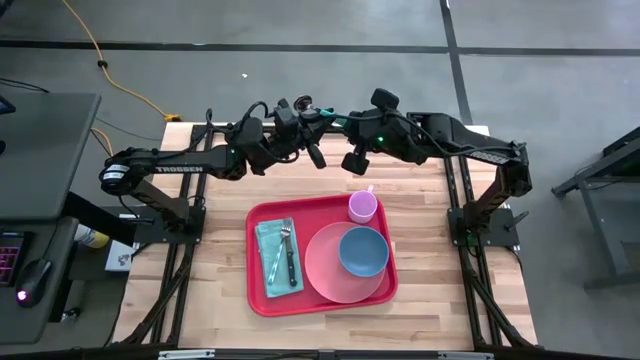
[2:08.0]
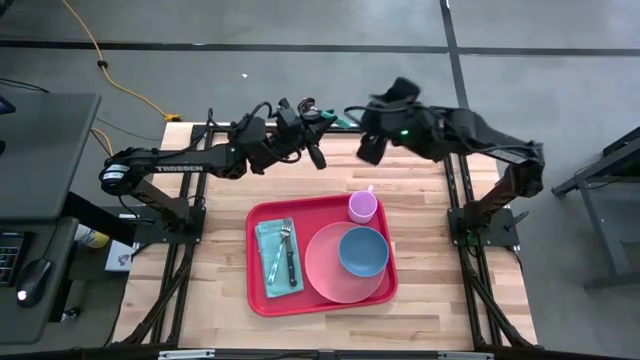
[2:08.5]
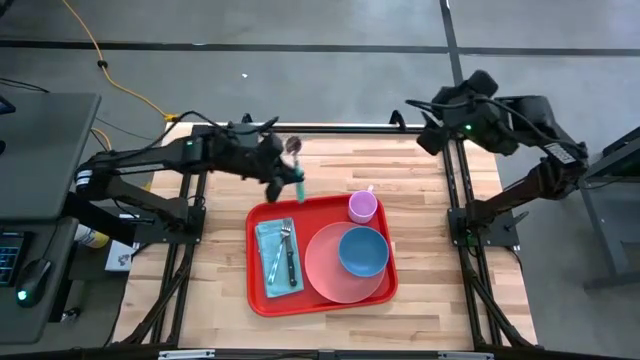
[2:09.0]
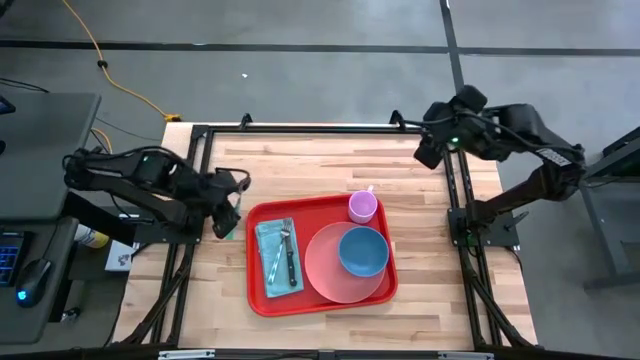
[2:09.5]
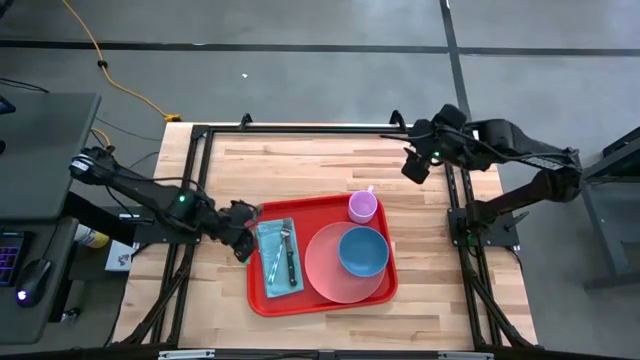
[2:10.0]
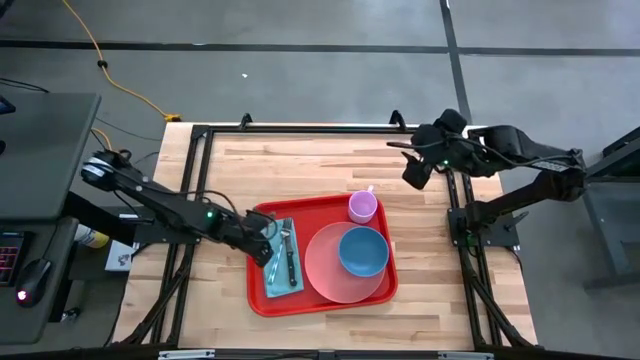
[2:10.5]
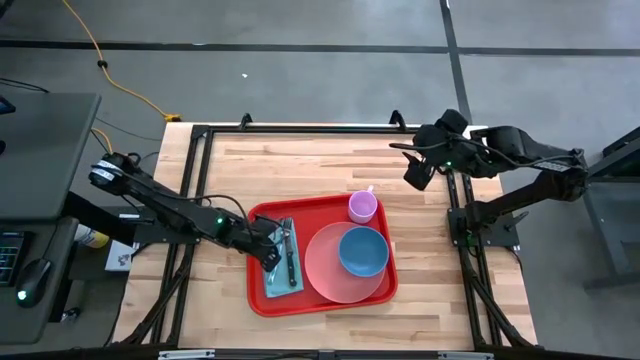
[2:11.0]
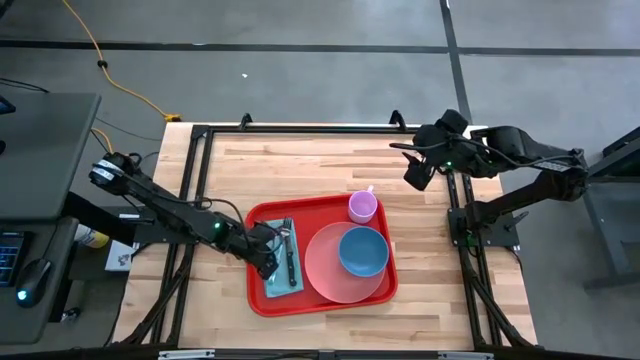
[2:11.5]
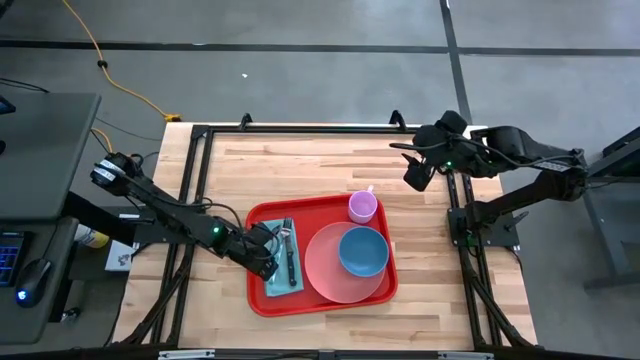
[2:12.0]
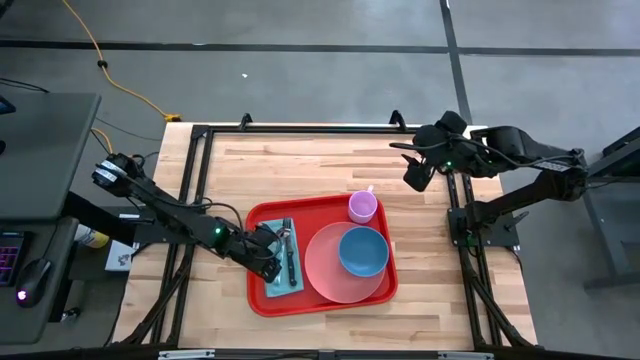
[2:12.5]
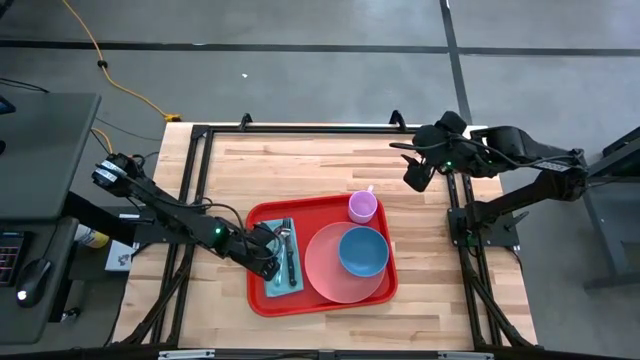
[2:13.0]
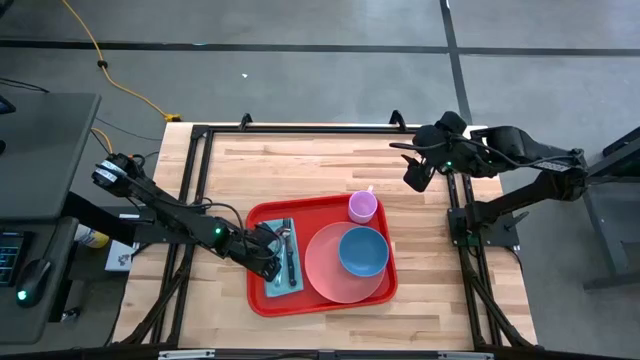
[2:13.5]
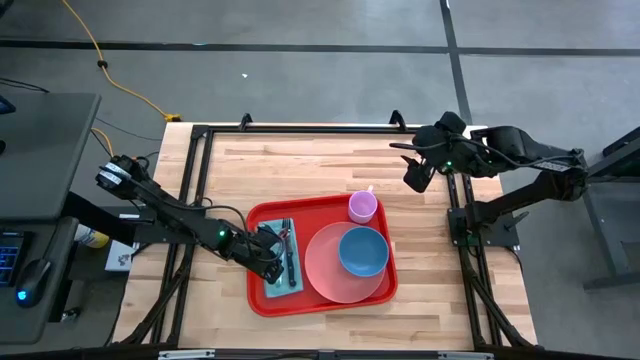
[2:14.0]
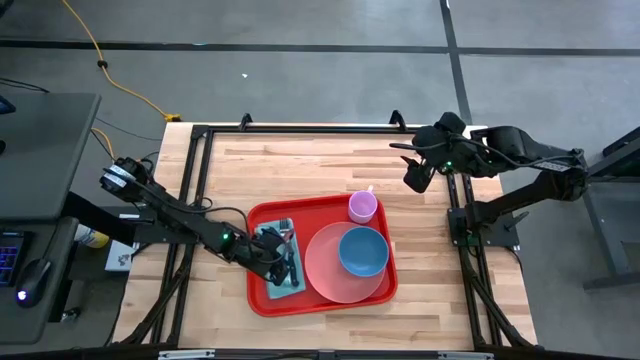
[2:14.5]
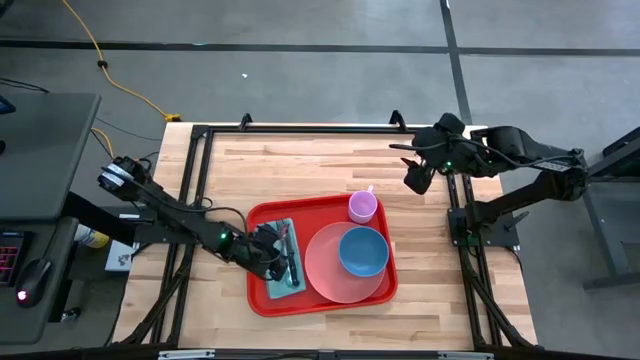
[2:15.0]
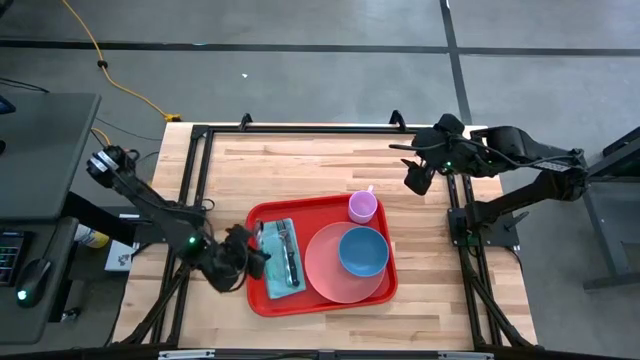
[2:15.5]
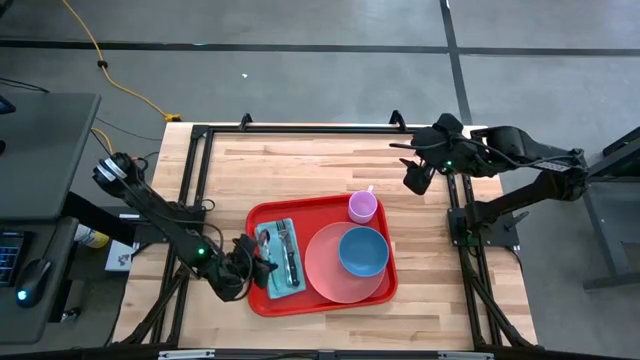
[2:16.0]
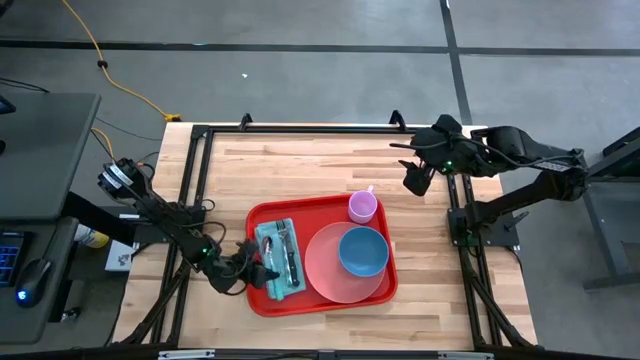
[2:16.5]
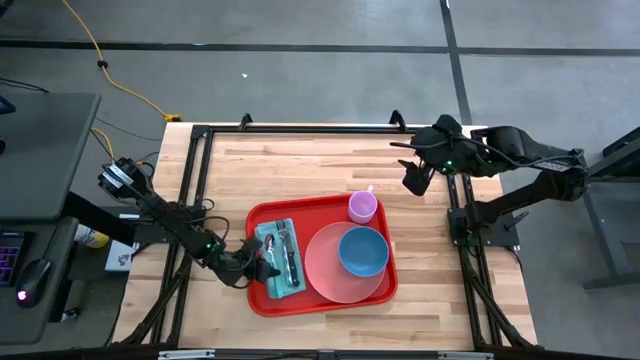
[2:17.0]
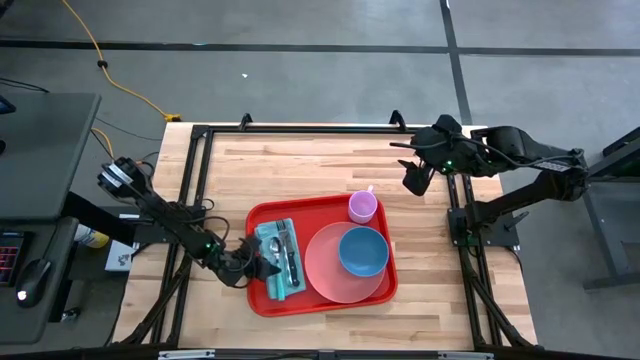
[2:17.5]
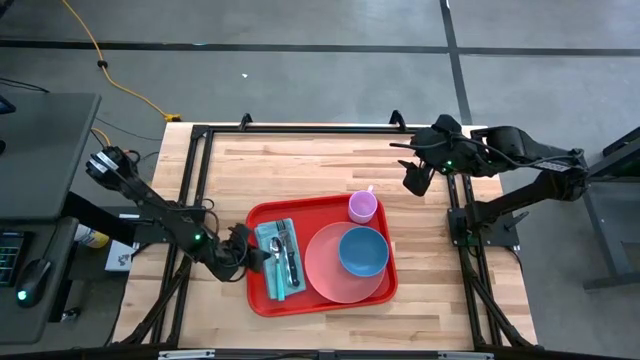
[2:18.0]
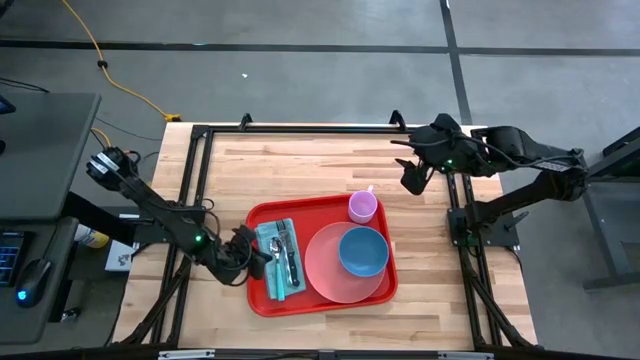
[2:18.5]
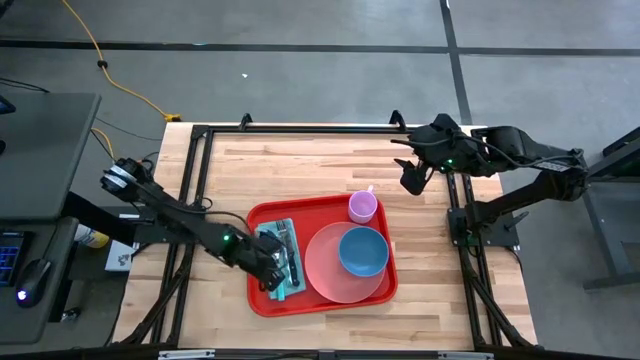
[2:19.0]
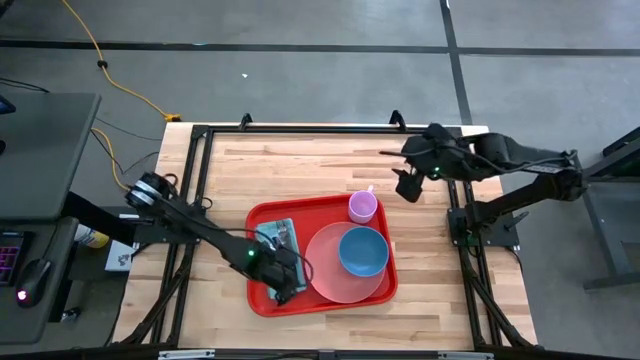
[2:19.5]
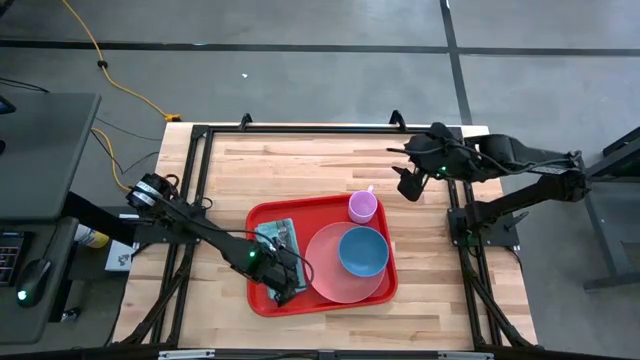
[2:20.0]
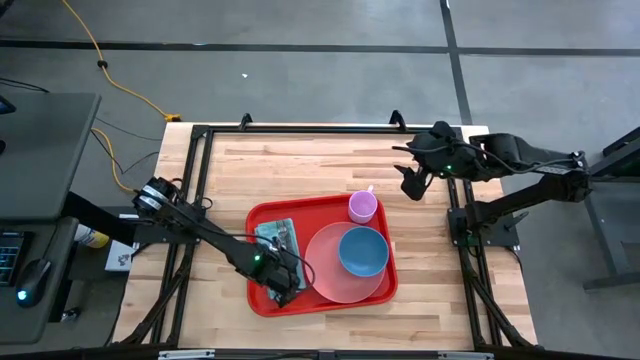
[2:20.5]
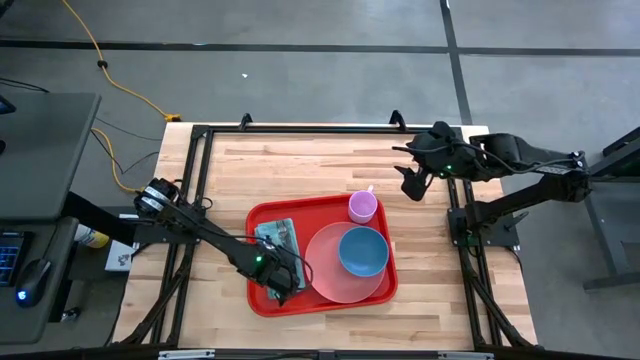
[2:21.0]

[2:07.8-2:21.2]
Task: Set up tray
Put the blue spoon on the blue napkin to the left of the blue fork

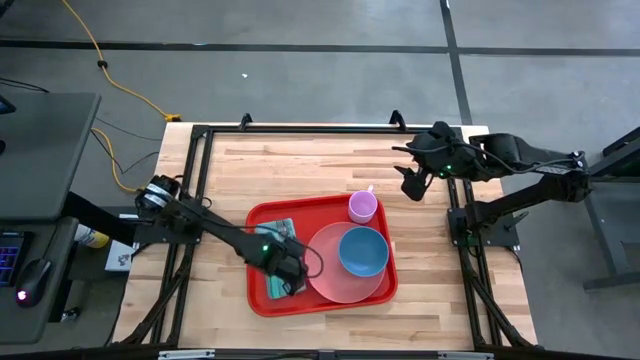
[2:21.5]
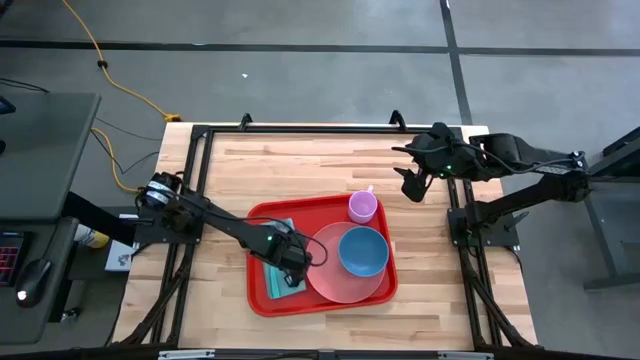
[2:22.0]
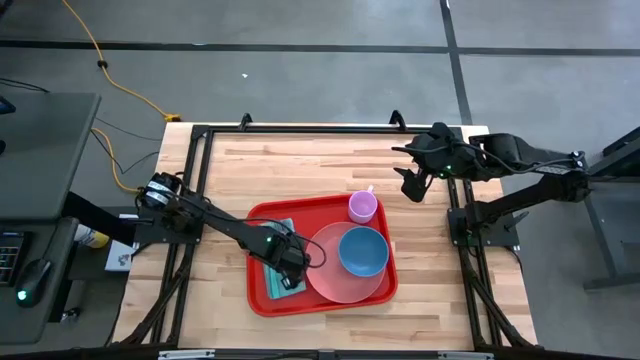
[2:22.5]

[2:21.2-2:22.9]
Adjust the blue fork on the blue napkin

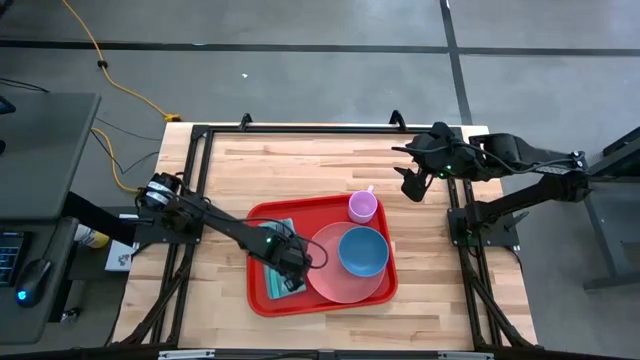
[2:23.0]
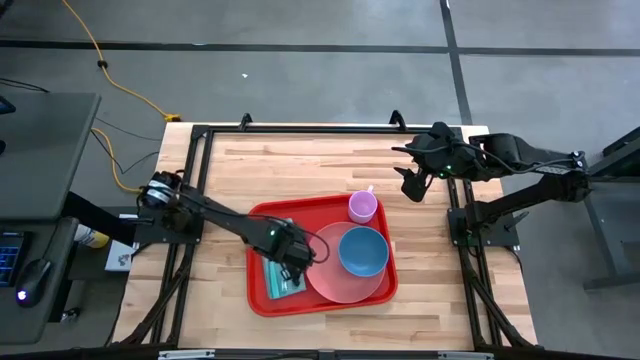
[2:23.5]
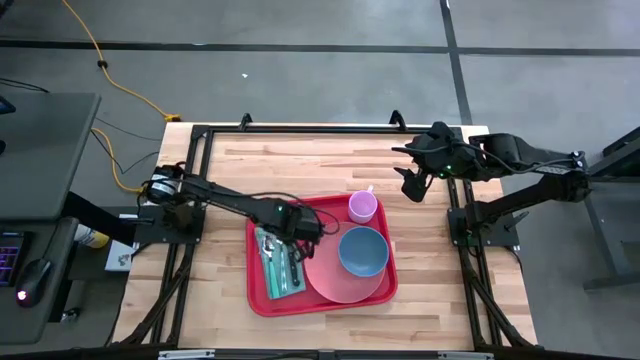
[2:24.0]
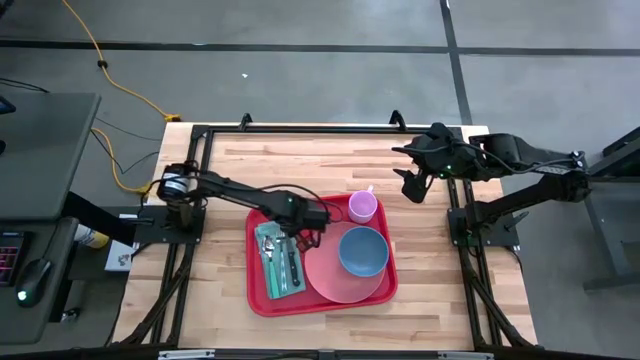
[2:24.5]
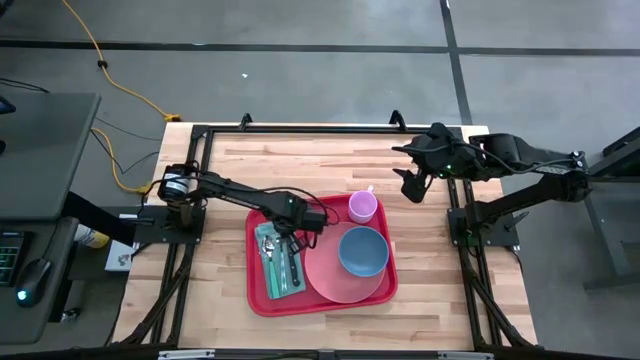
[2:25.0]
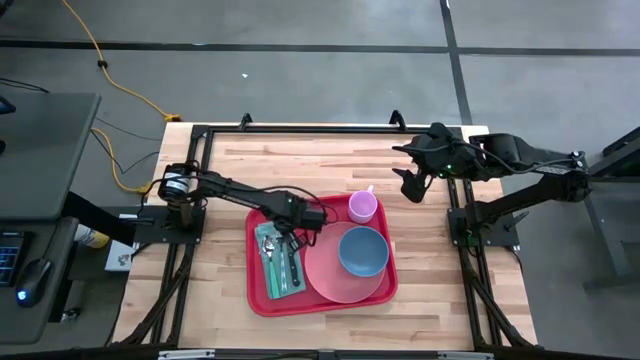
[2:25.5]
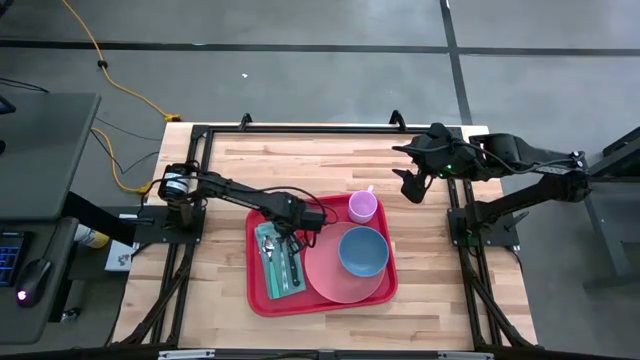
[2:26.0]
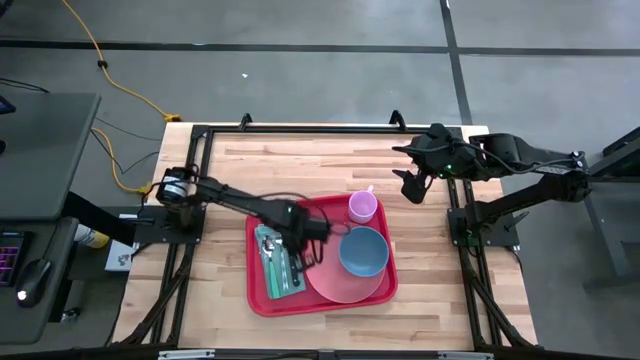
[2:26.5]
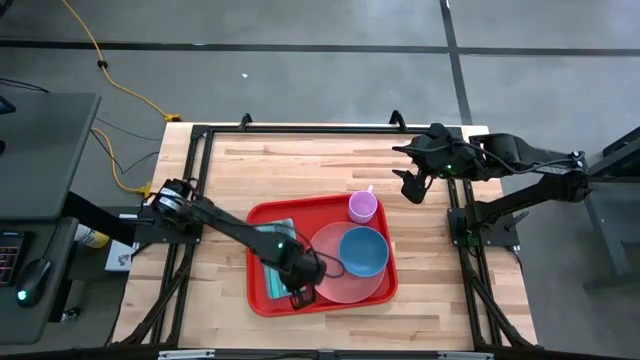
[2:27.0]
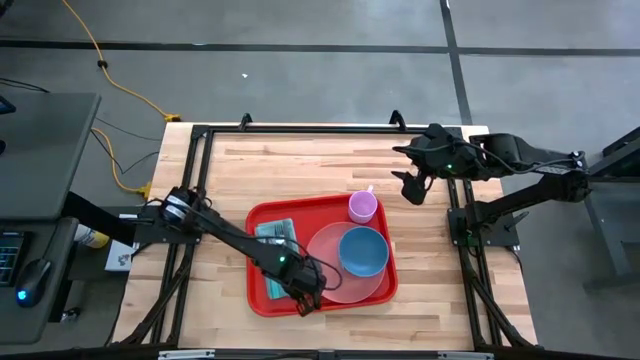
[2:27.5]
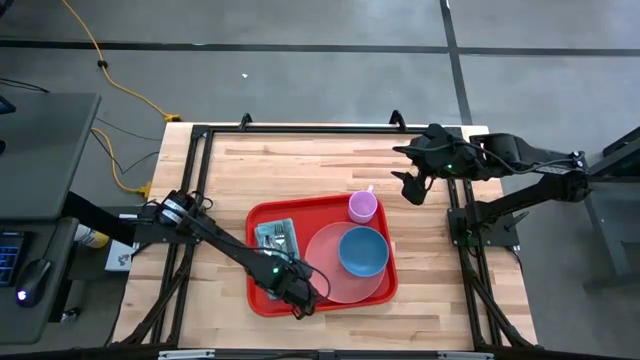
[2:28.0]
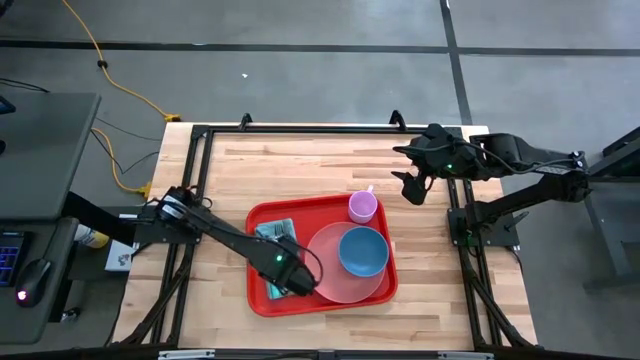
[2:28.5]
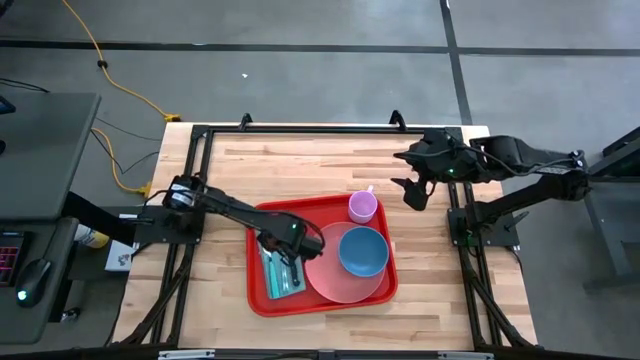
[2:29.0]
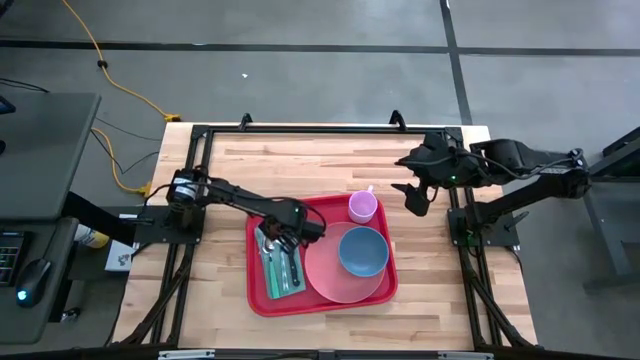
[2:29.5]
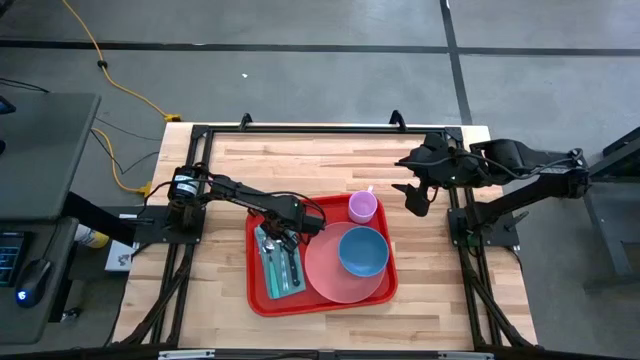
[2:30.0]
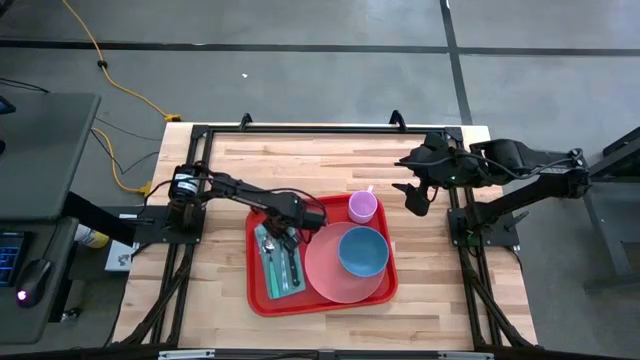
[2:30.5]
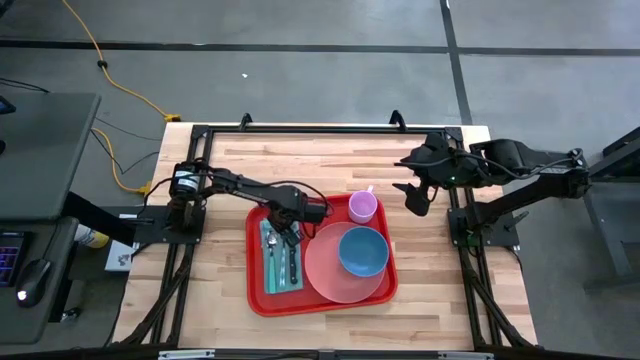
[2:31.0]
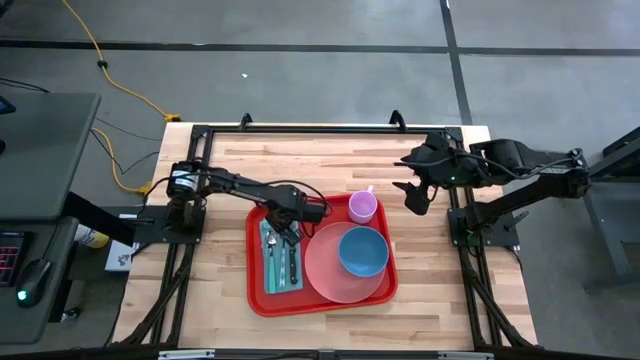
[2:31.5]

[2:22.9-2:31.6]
Adjust the blue napkin on the red serving tray
